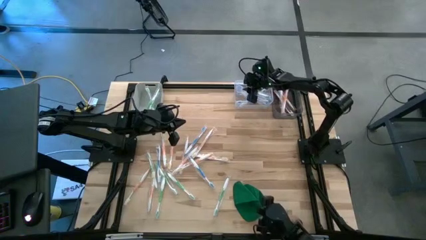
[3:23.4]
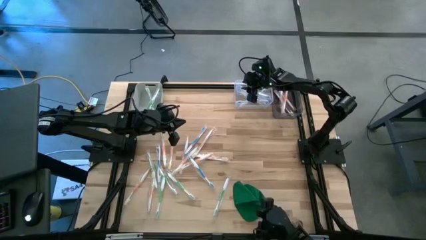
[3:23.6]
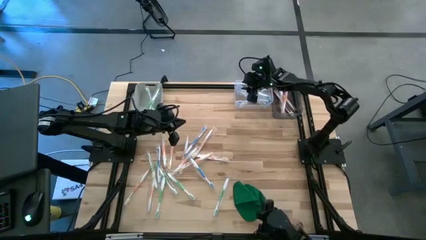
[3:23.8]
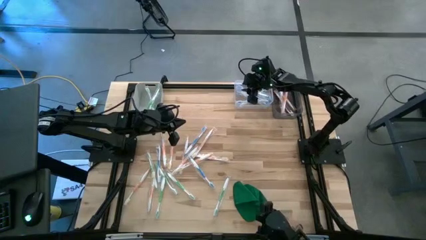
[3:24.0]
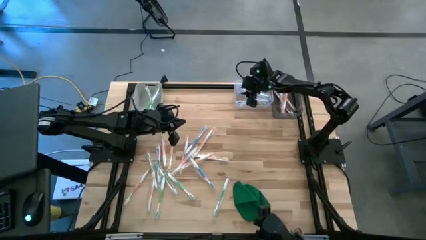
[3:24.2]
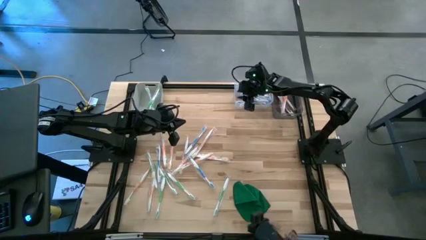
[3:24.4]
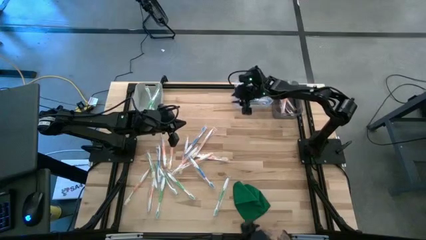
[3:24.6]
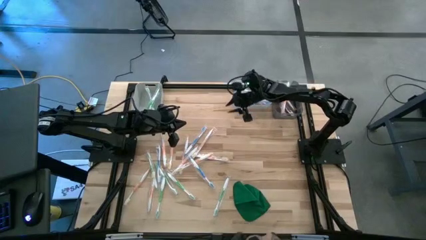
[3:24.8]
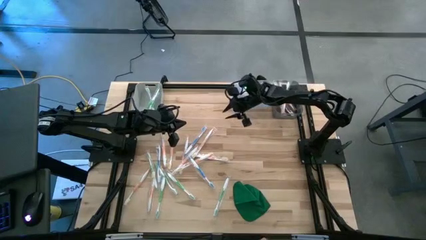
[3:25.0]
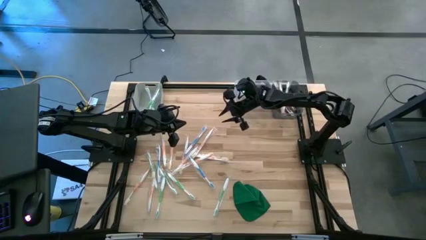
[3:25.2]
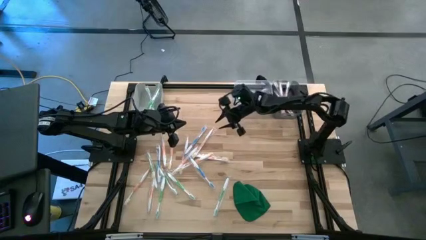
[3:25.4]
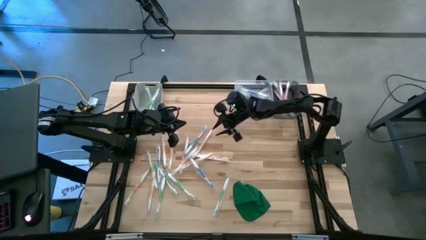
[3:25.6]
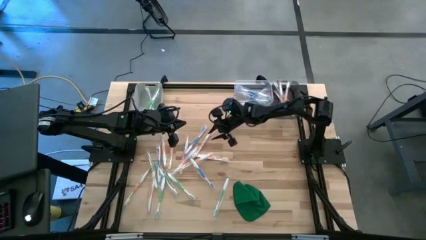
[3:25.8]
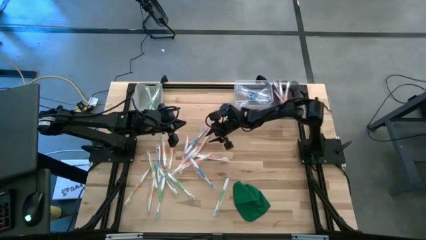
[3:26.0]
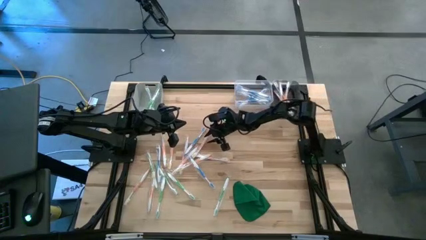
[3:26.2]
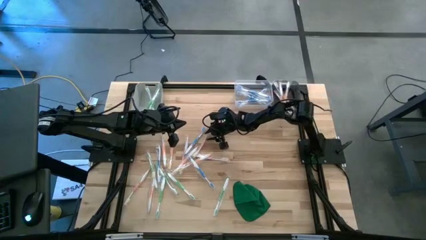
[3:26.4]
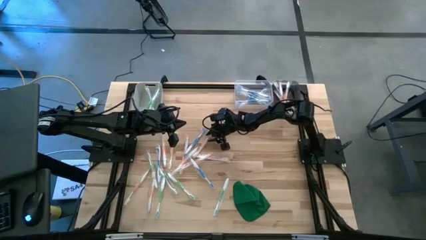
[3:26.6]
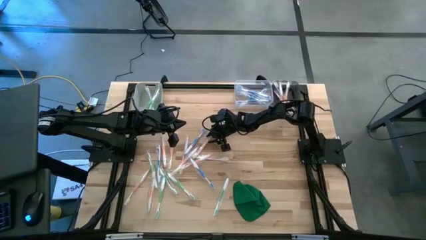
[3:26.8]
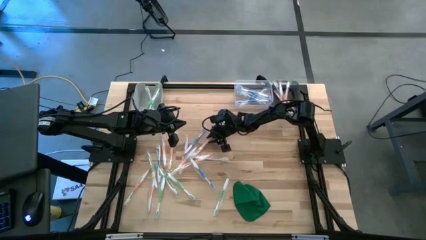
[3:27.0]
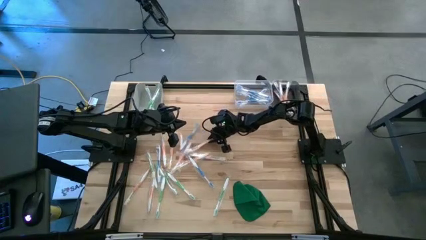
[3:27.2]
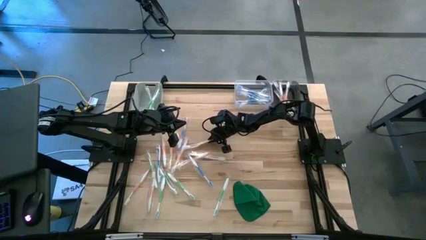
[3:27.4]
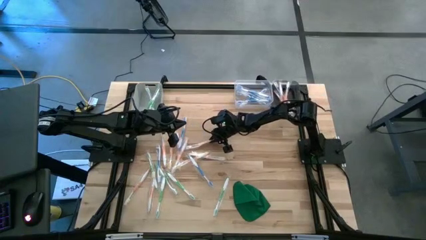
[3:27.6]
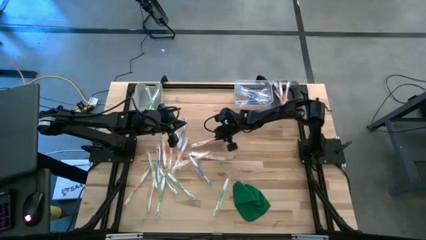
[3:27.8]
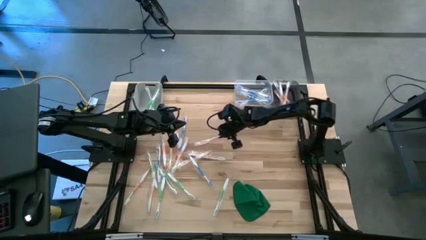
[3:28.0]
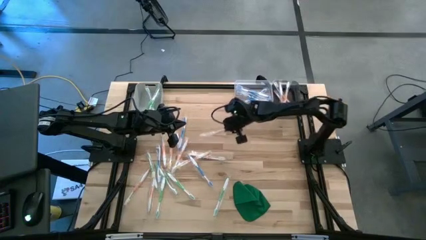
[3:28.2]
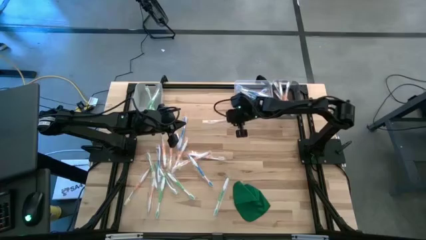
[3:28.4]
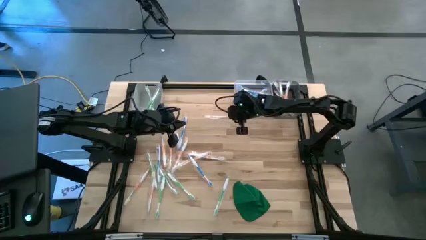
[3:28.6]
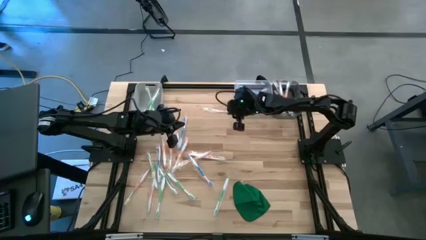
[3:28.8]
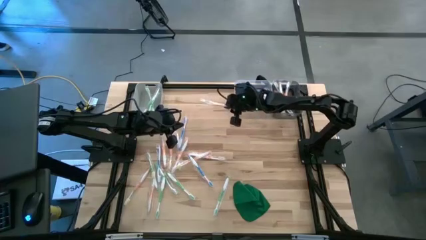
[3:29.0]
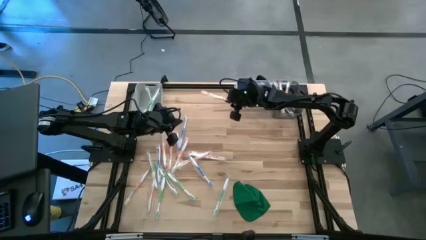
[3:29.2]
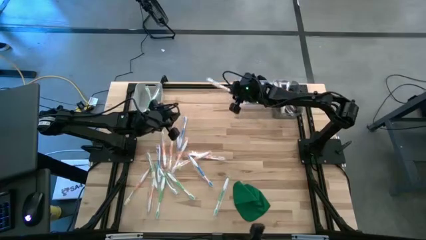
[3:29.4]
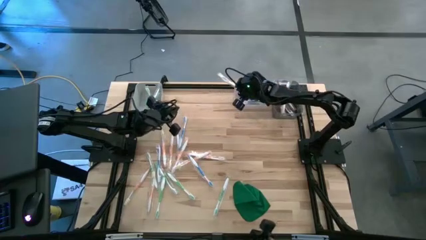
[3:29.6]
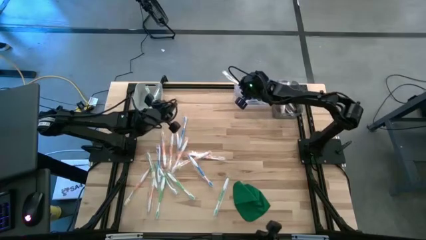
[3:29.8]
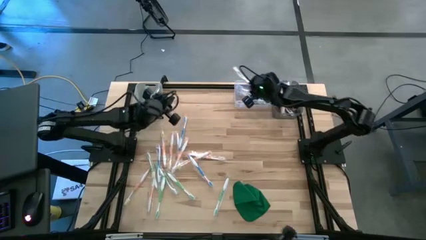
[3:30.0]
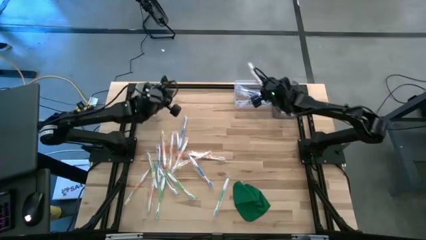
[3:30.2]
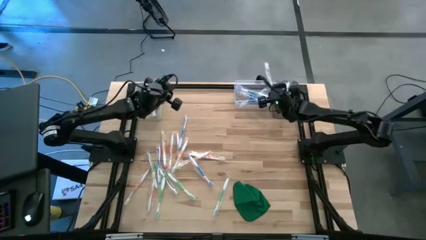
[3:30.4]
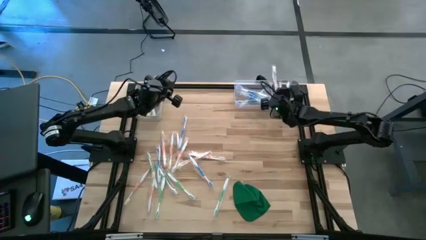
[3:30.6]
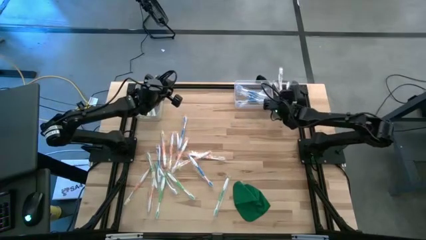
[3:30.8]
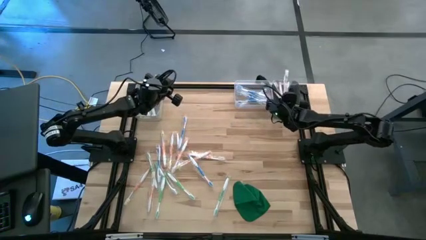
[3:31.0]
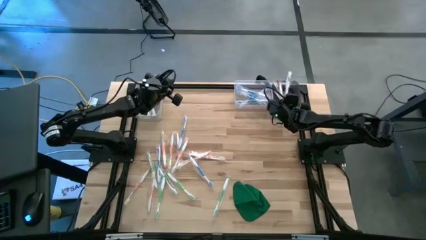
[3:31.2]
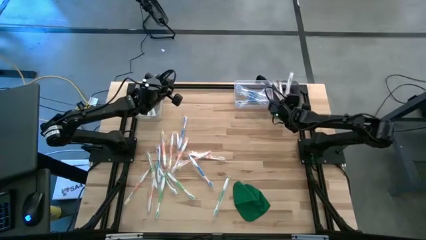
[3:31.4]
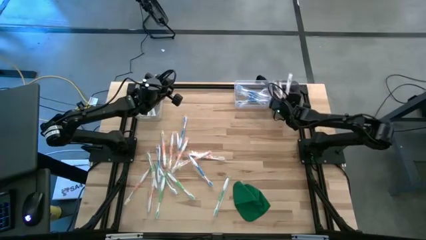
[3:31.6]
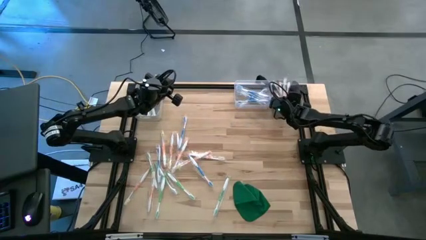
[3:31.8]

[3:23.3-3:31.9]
Task: Pick & Place Toothbrushes
Put the orange toothbrush into the black bin

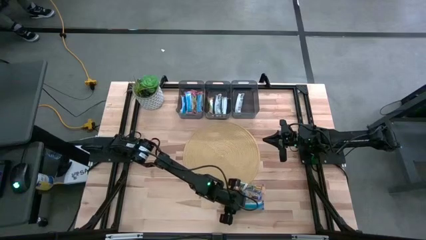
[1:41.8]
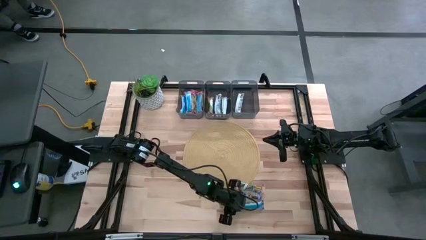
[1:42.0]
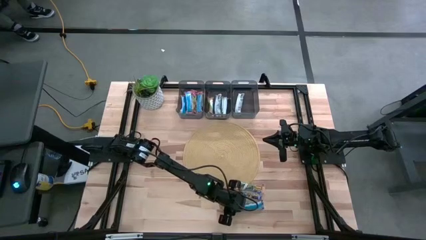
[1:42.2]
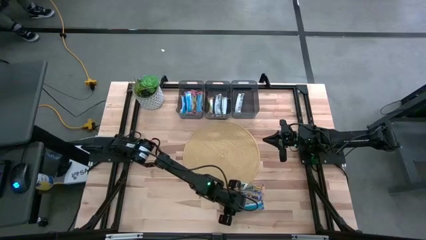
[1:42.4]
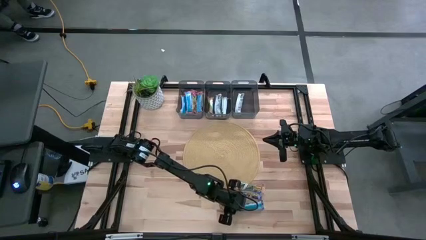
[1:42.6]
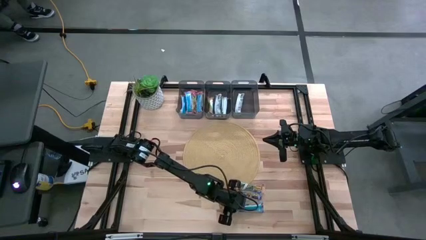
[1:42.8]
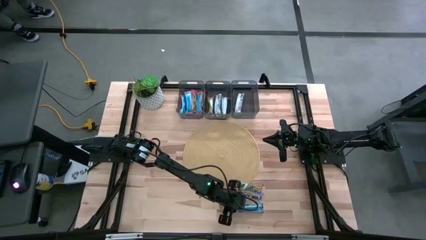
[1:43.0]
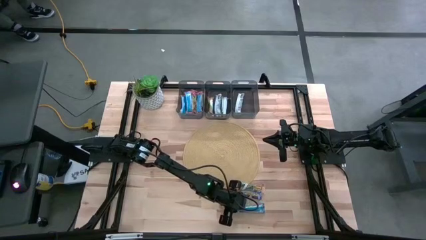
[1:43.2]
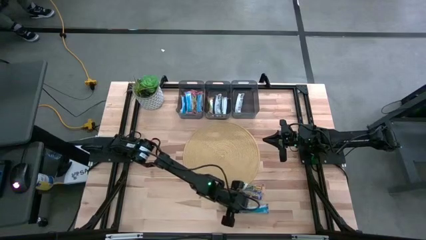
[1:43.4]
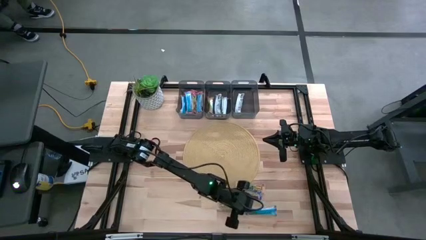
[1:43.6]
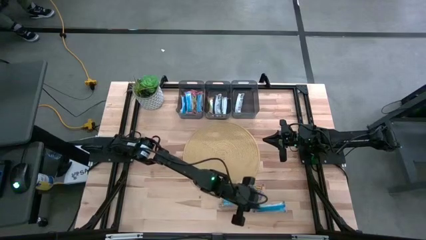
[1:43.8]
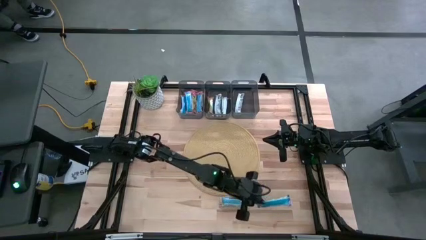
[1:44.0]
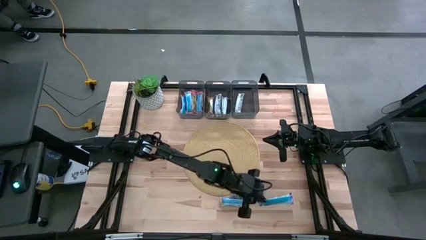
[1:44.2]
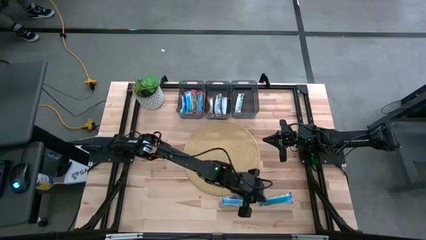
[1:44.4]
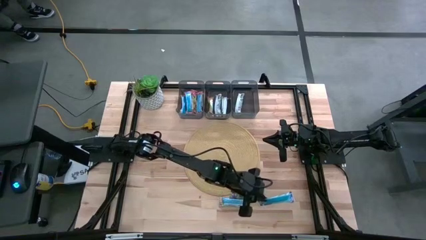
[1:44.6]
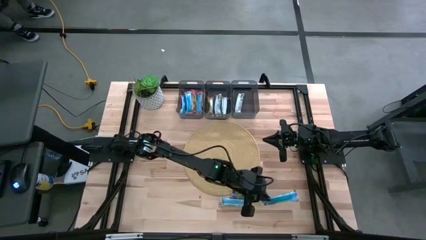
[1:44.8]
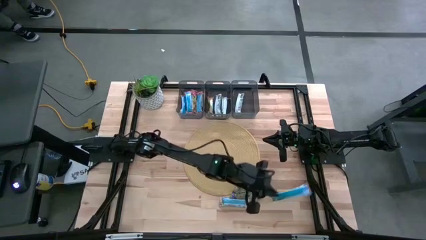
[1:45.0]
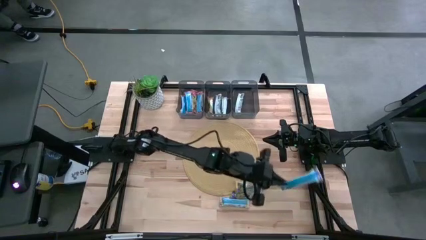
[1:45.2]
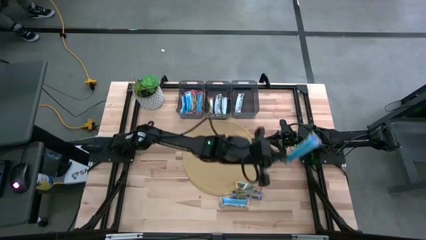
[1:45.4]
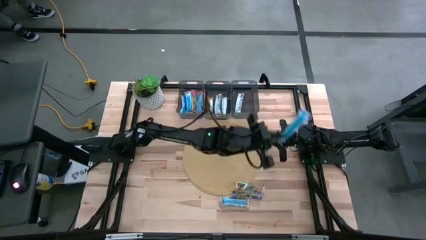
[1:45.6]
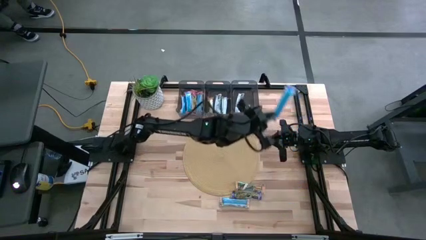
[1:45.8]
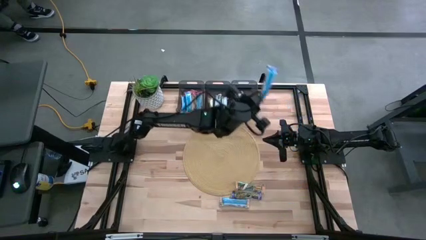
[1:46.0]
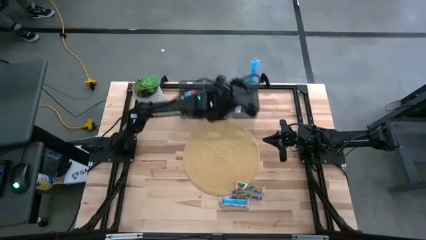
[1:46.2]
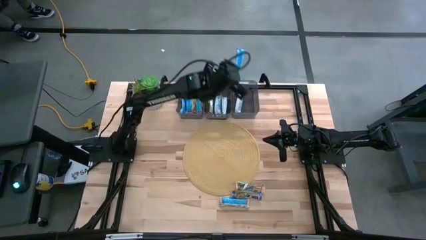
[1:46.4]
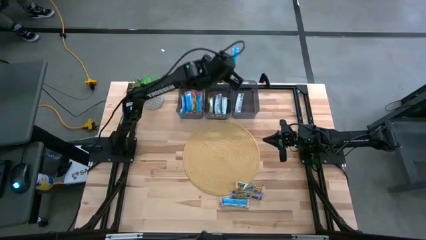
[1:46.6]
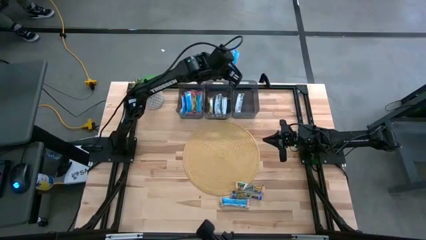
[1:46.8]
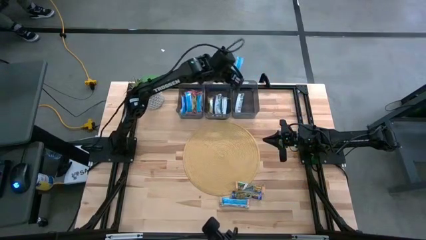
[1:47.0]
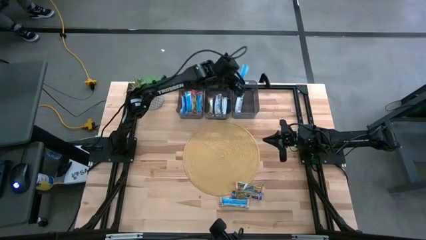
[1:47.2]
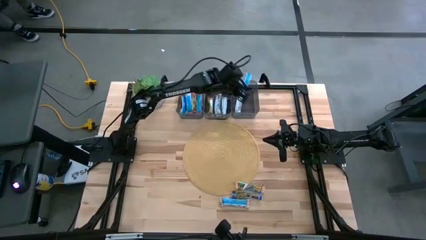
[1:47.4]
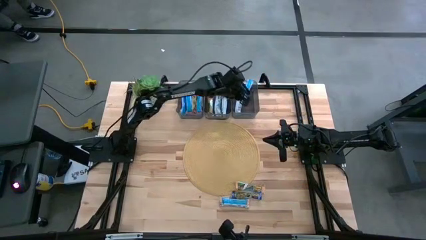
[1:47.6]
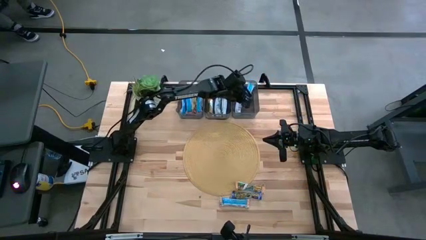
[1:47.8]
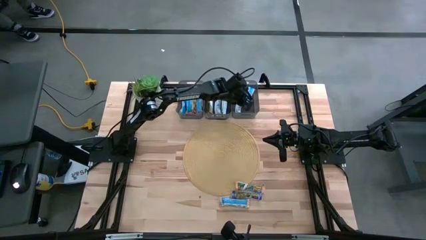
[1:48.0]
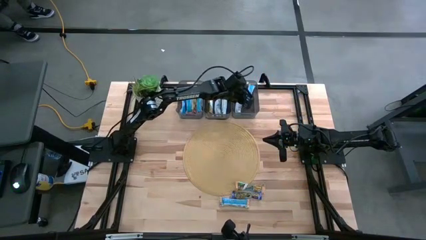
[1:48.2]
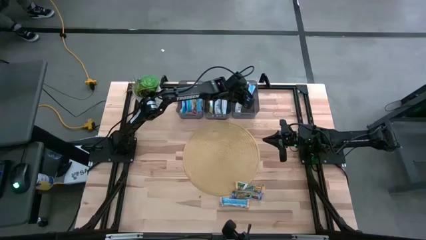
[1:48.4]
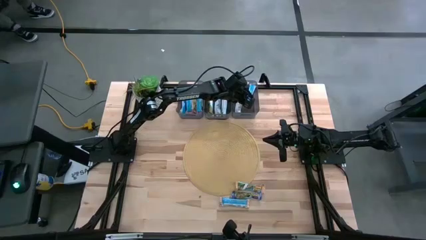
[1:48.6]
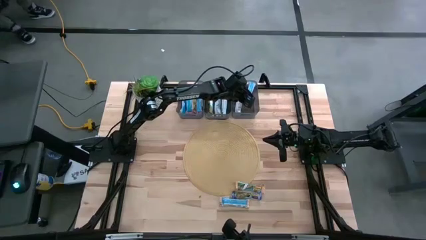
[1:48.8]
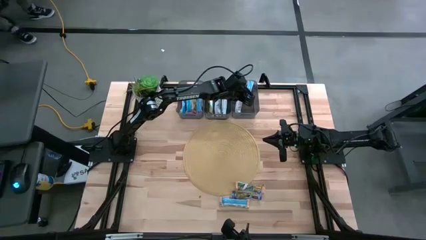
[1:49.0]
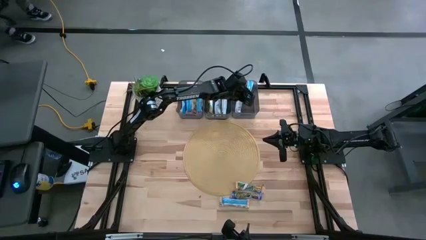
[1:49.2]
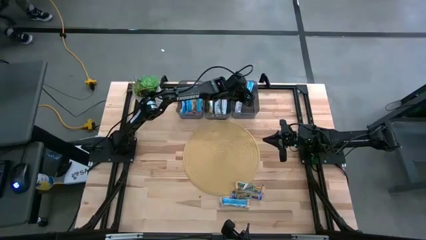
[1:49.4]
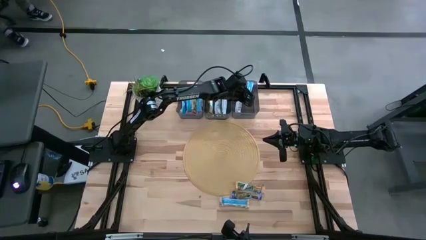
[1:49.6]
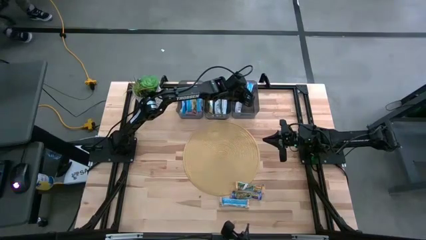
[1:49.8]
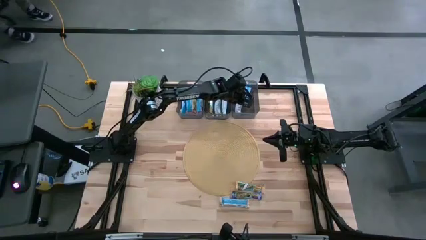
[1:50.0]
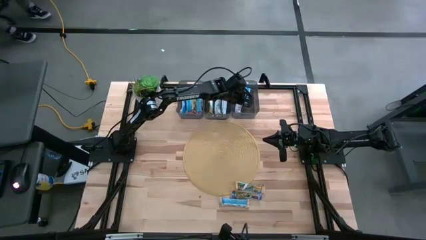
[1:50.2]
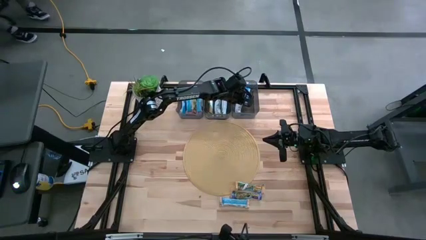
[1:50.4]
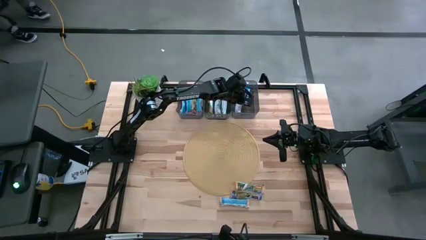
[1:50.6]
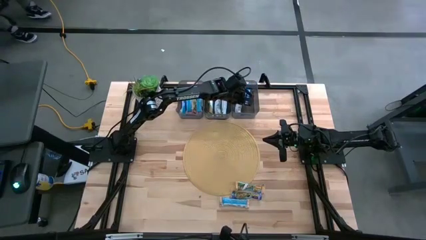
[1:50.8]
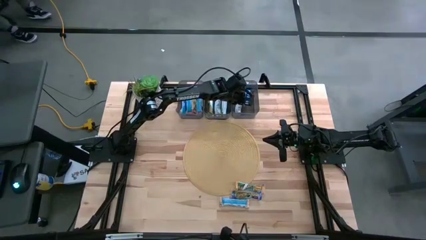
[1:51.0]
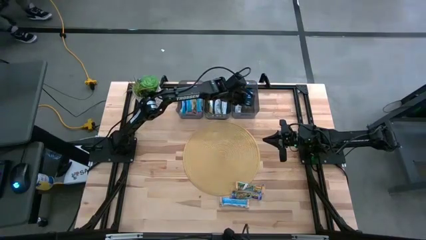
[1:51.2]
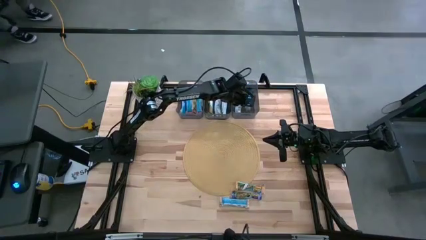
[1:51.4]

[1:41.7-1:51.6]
Task: Pick and place Granola Bars by type
Put the blue granola bar into the right black bin
